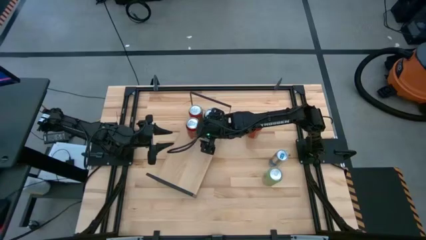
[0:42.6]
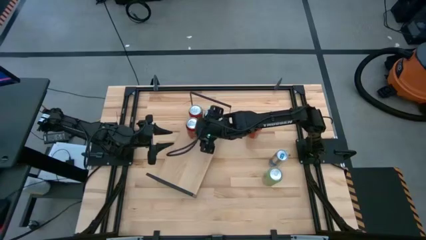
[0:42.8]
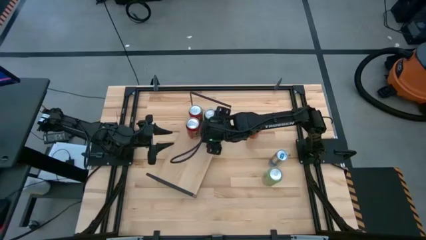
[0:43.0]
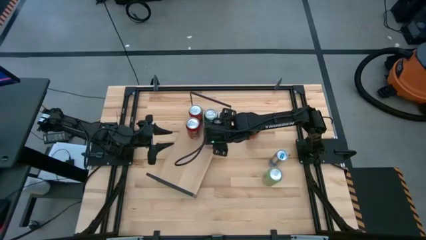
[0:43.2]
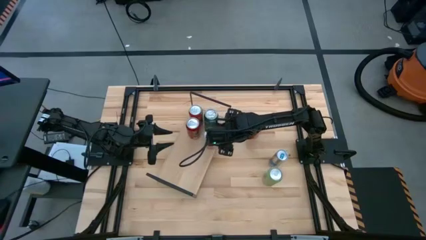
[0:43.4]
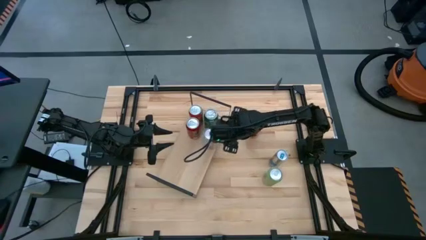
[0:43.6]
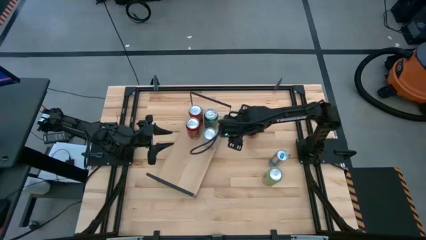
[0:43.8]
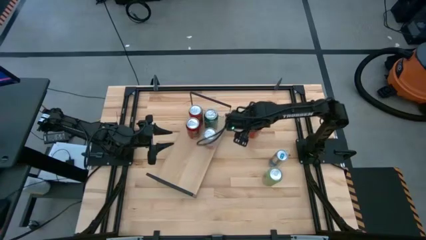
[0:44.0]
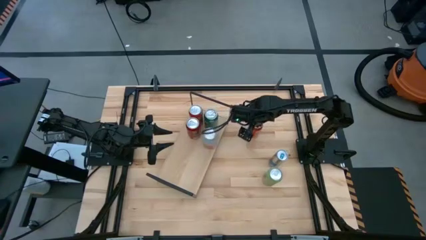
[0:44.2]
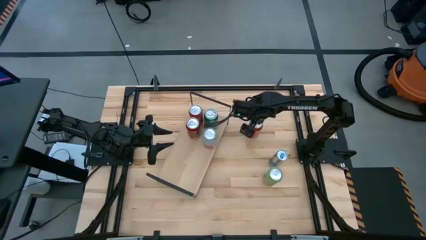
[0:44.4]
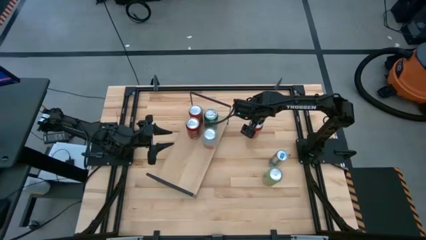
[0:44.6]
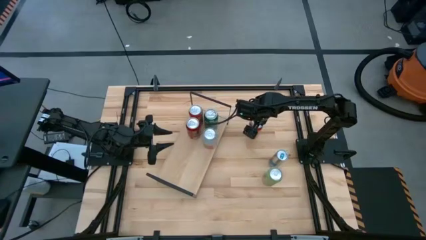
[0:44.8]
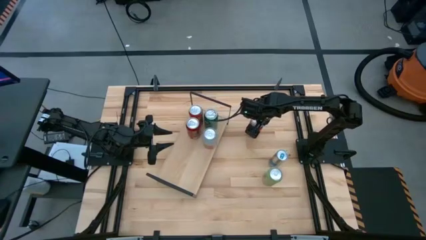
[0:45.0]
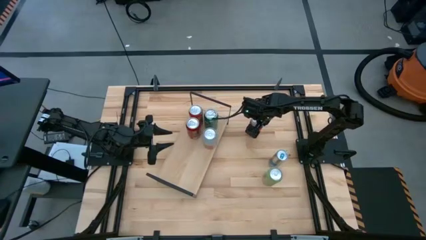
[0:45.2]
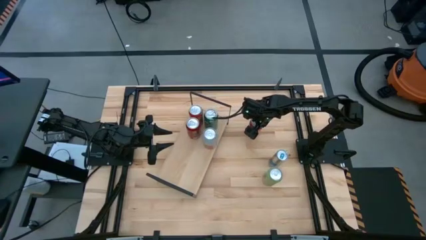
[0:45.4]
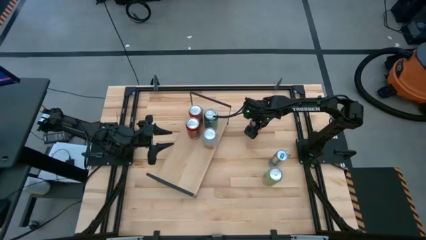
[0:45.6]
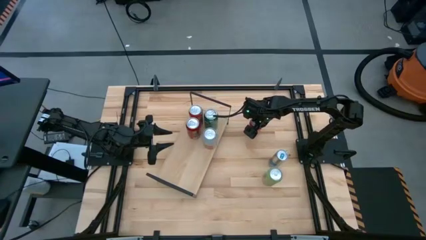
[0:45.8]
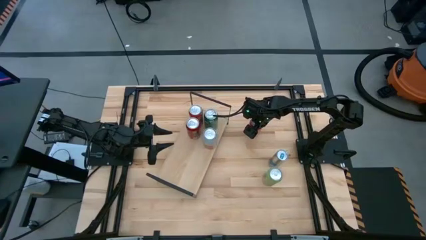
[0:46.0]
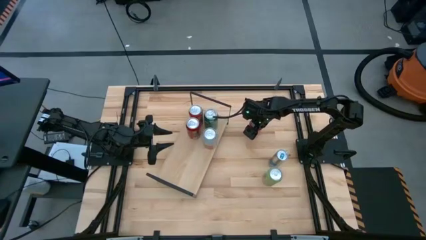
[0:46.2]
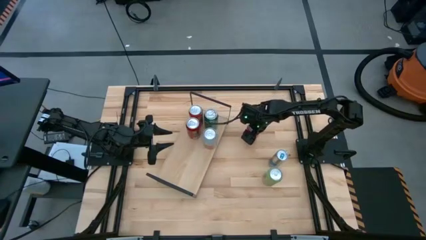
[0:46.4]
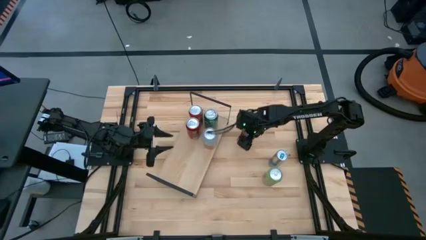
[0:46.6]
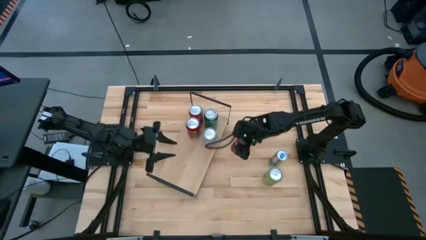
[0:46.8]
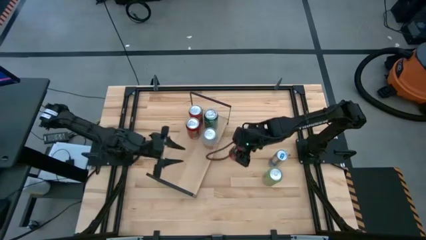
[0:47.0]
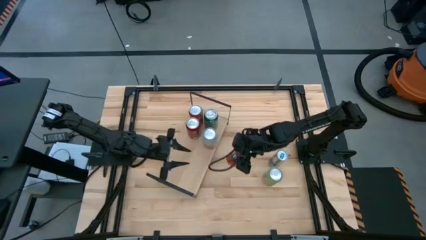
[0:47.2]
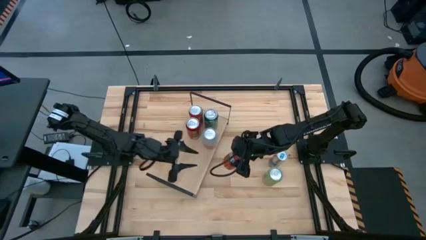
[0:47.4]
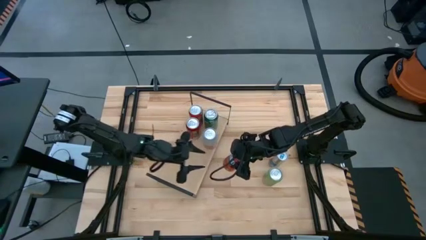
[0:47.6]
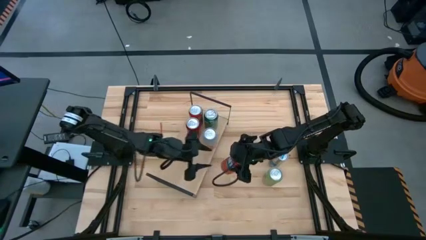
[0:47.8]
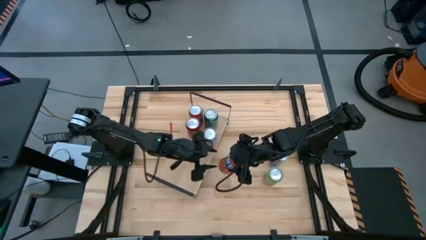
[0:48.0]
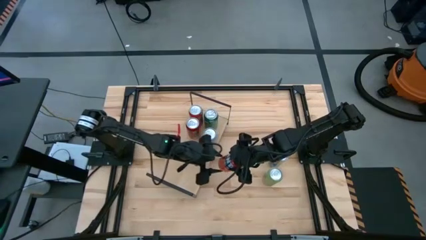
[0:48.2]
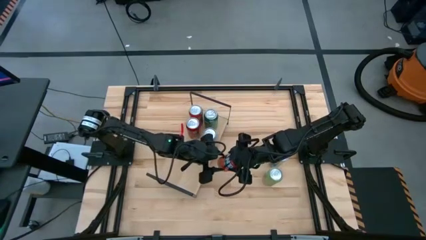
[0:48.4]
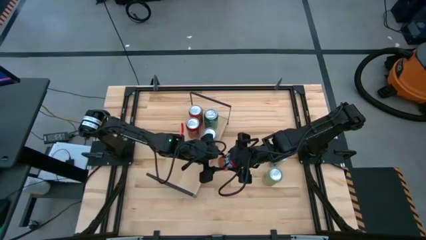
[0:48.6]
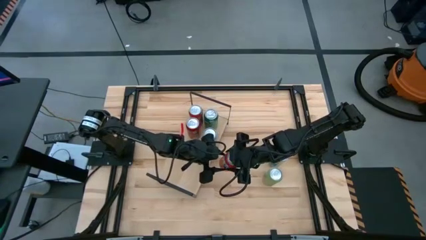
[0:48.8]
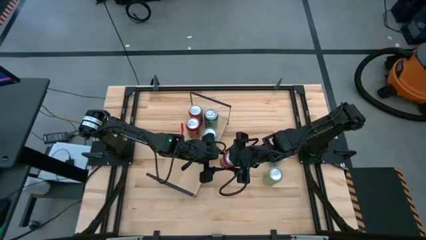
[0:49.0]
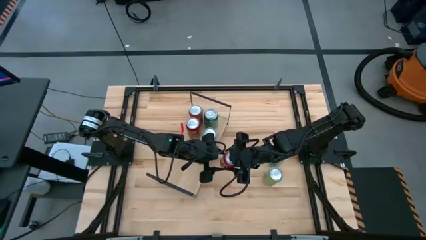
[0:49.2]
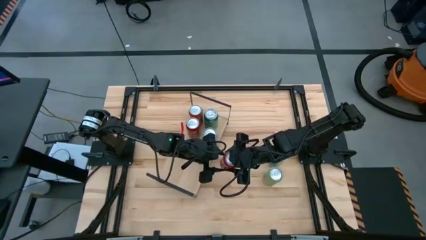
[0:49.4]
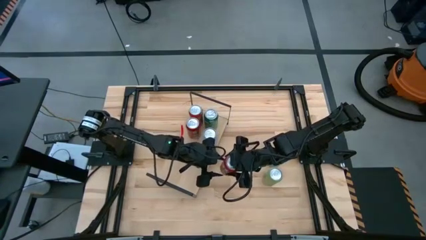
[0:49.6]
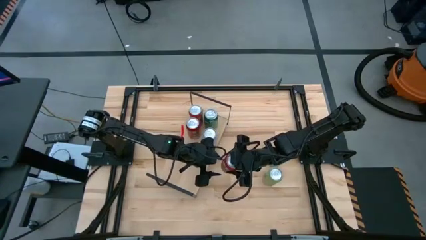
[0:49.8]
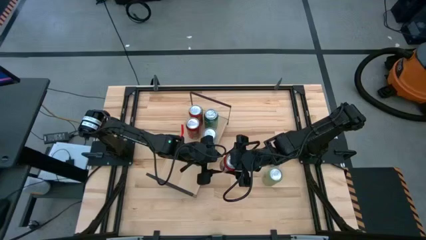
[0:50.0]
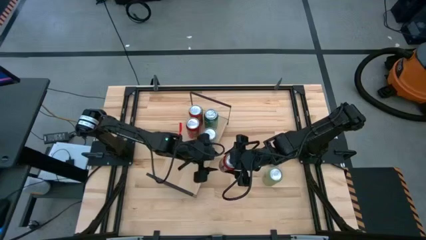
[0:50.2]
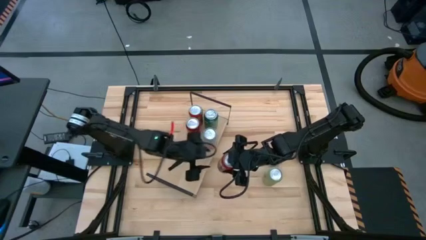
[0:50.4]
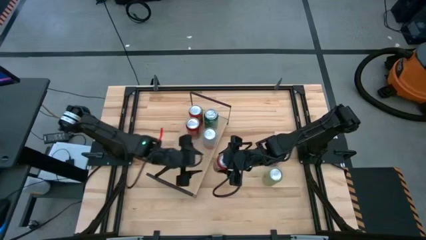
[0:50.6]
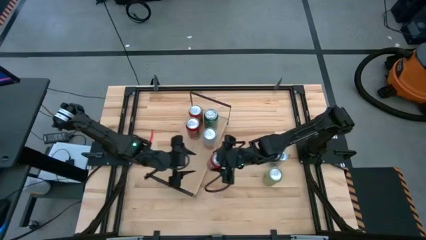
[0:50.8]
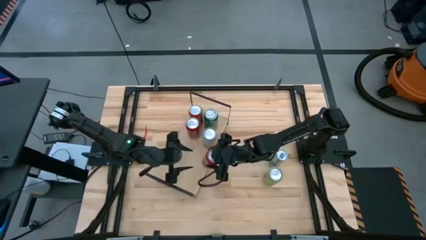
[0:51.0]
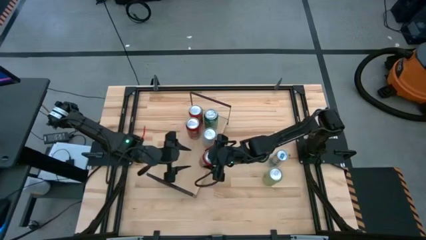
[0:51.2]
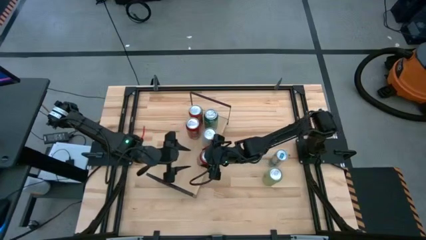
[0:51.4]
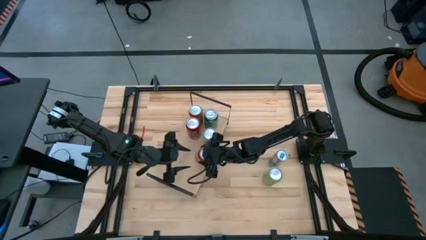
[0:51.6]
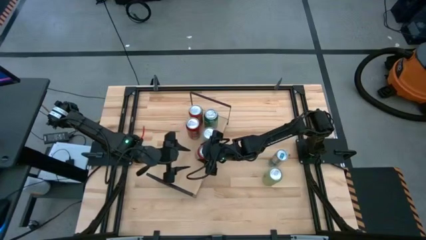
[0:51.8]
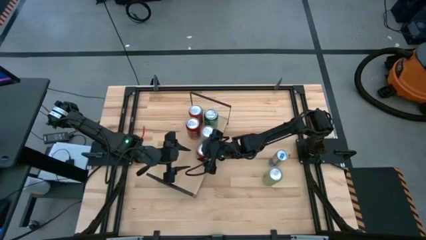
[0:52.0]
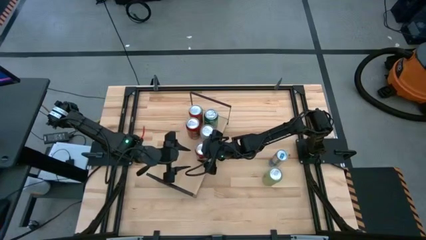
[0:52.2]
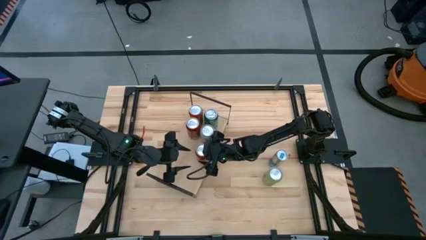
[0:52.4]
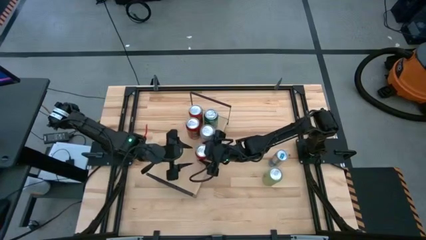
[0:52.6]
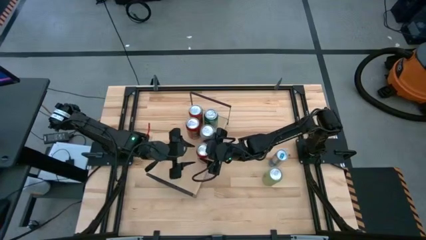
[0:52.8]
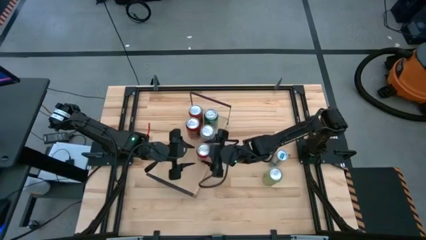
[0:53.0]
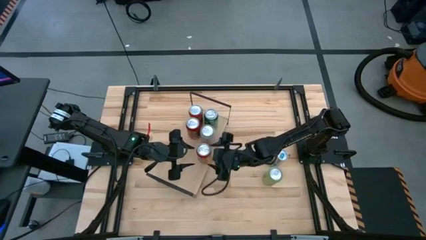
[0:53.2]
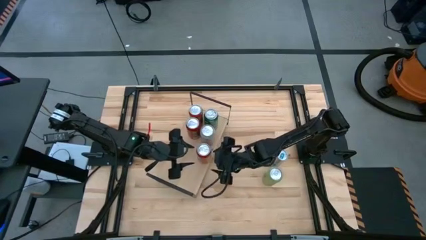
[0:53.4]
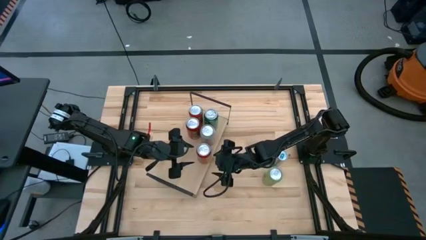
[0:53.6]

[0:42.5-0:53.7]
Task: Place canned beverage on shelf
Put the orange soda can on the shelf
